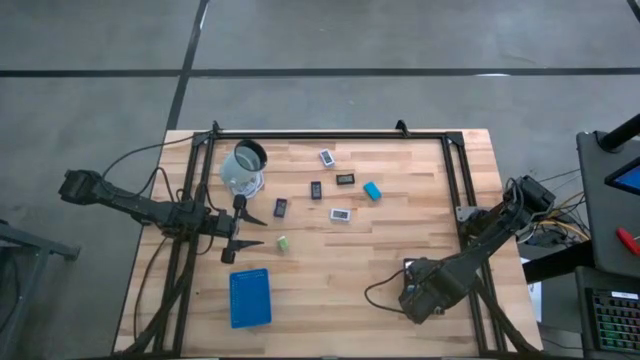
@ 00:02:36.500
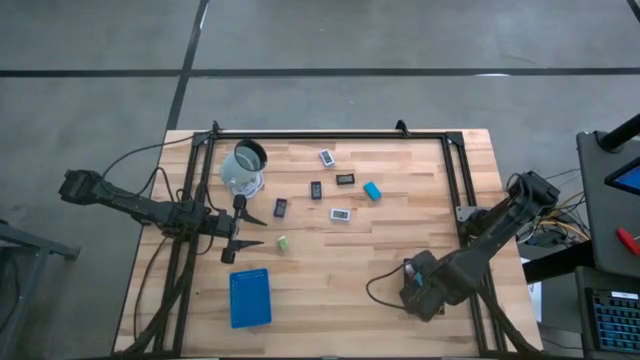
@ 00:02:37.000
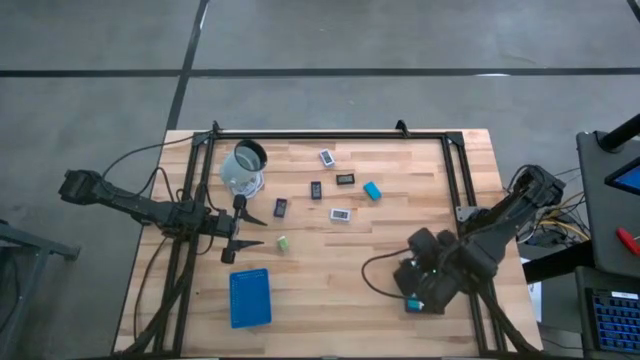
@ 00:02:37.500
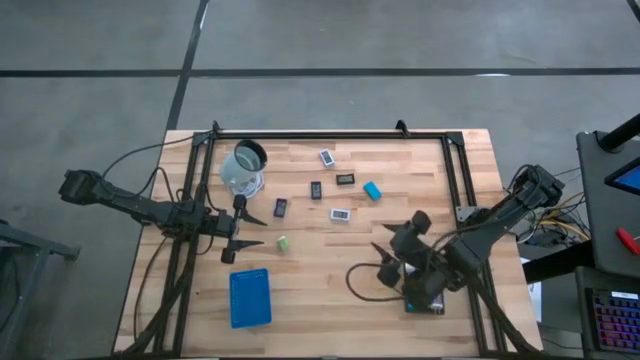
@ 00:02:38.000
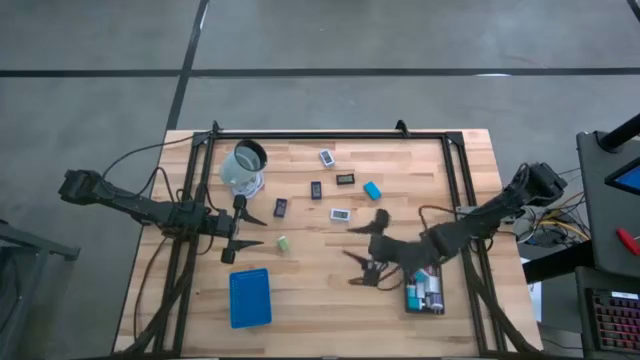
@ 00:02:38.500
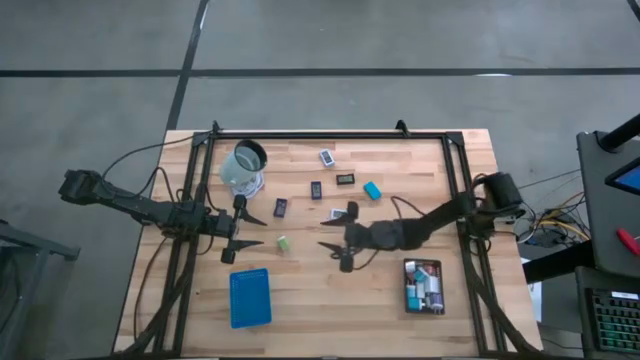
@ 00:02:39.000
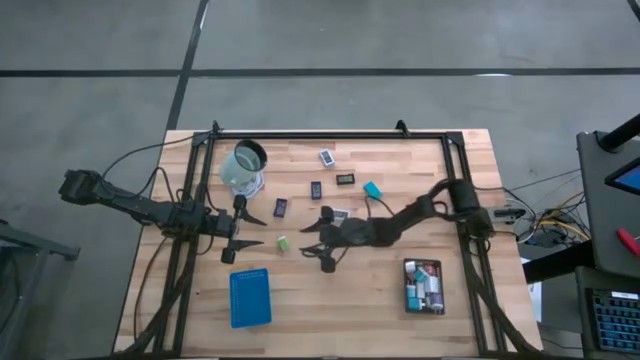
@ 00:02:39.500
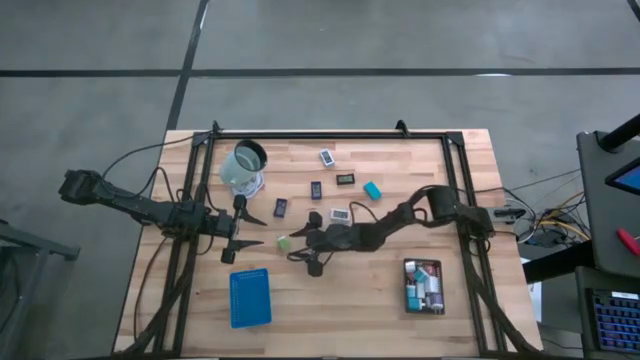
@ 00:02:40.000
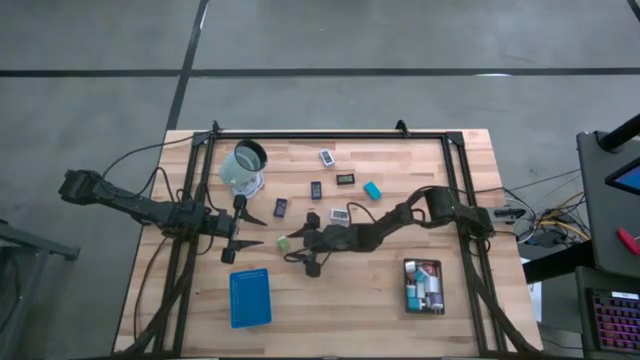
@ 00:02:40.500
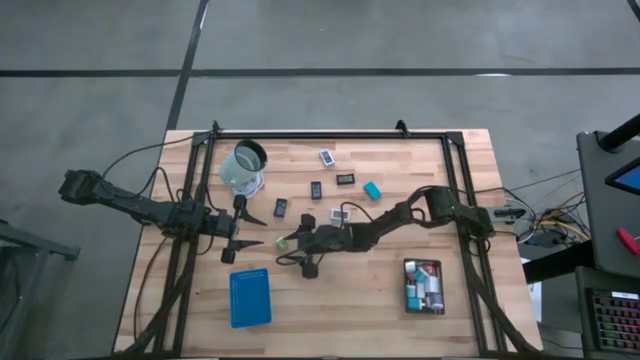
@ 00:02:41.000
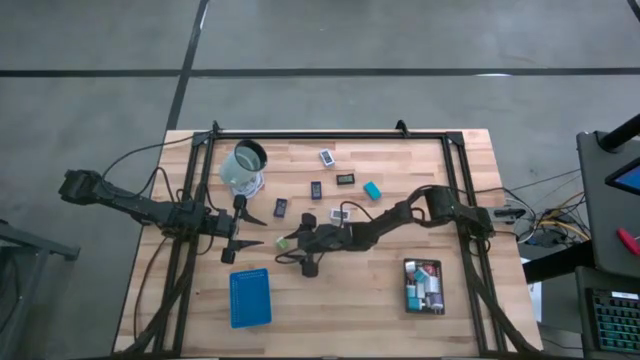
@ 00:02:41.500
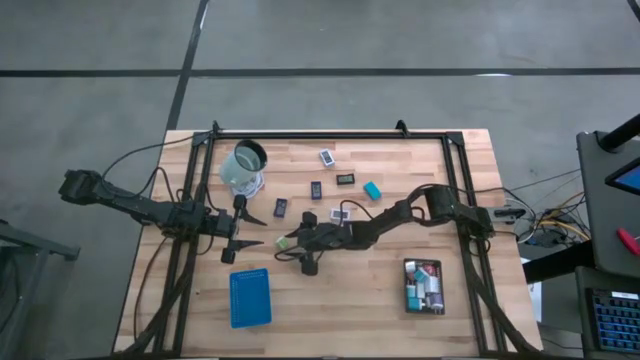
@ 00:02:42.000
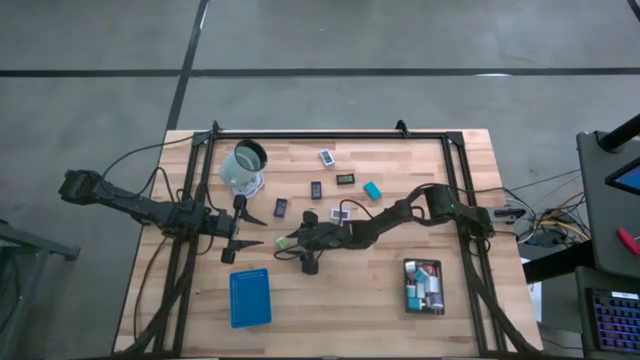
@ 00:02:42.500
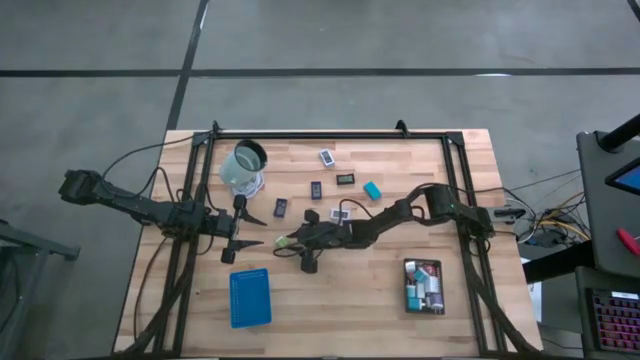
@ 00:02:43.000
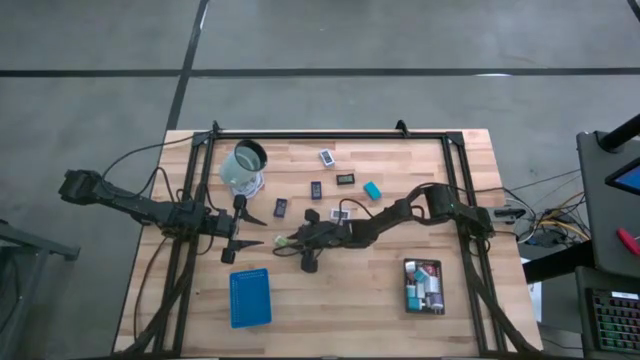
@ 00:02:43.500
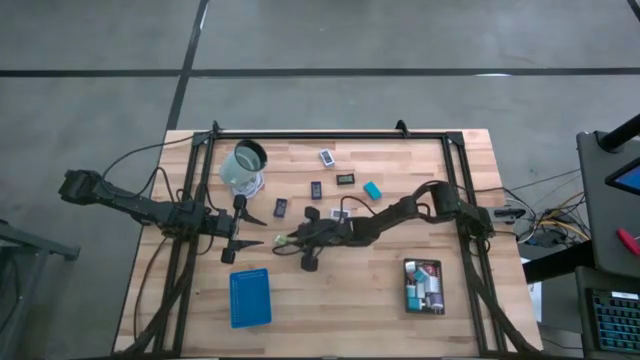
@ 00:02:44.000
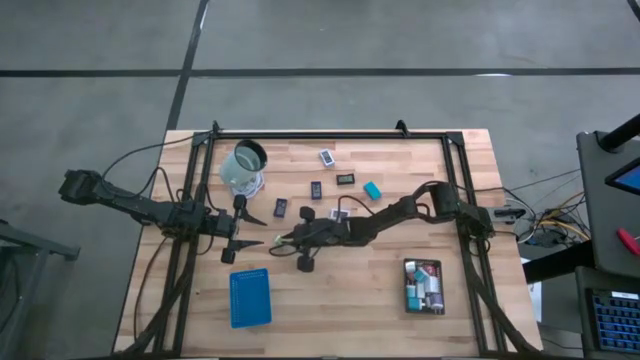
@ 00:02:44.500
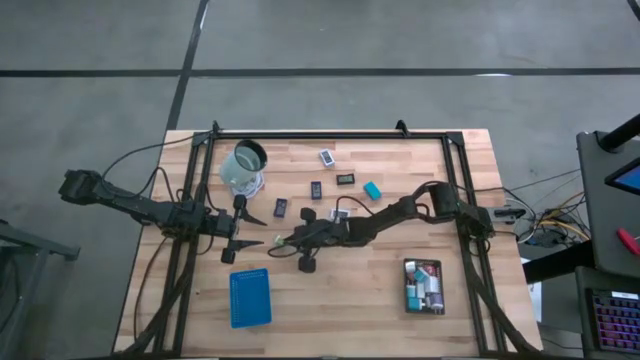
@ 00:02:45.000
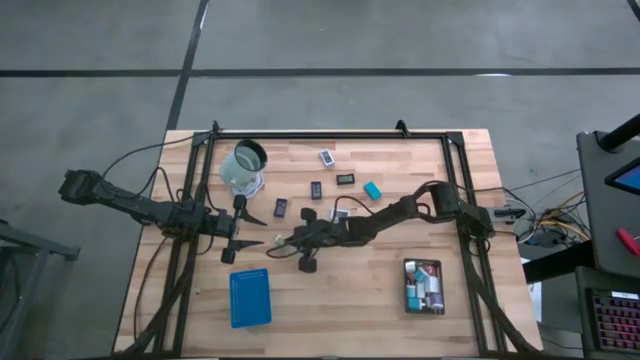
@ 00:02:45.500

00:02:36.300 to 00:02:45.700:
Task: Pick & Place Office items
Put the green charger adapter into the black bin

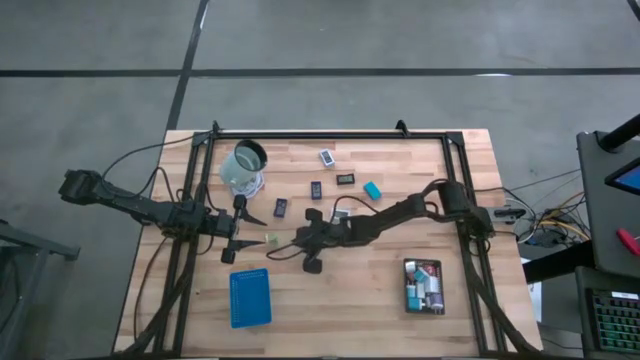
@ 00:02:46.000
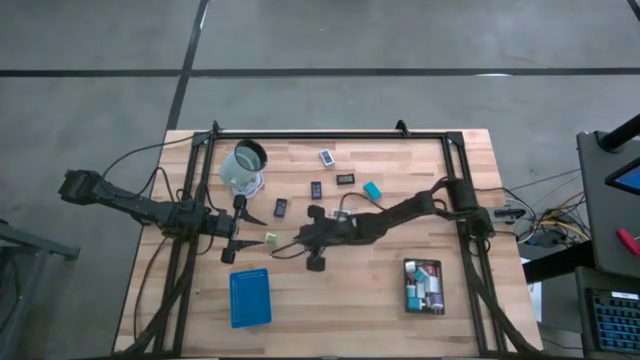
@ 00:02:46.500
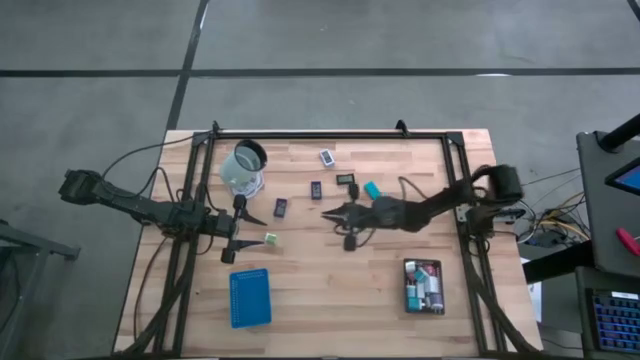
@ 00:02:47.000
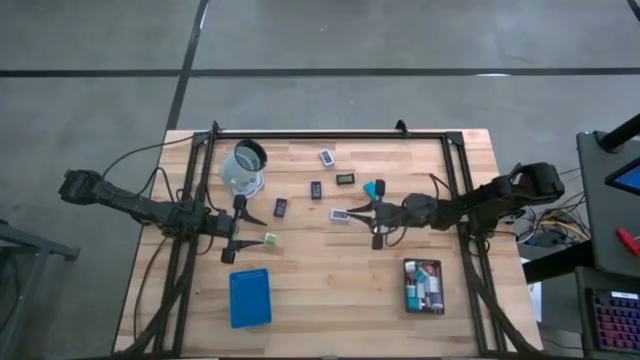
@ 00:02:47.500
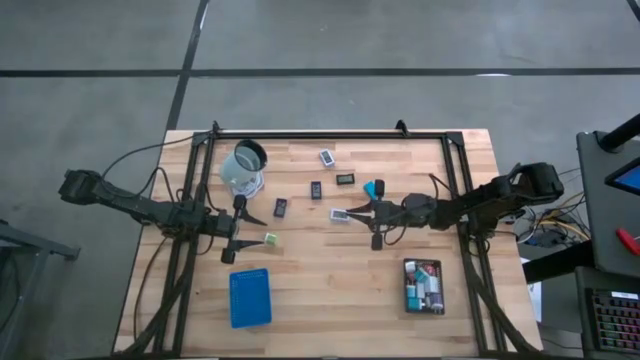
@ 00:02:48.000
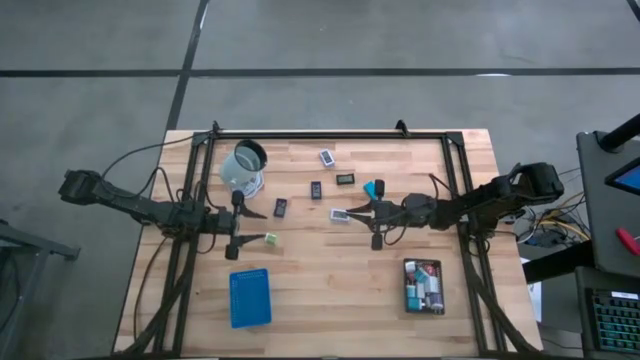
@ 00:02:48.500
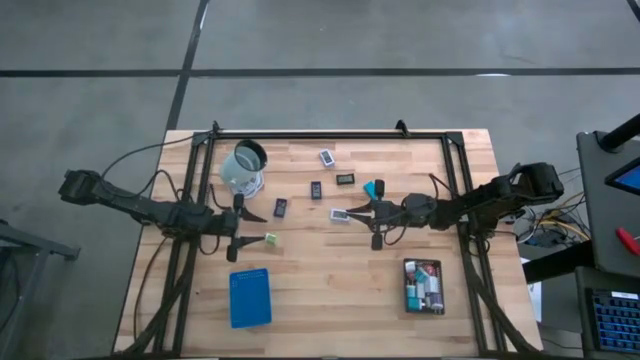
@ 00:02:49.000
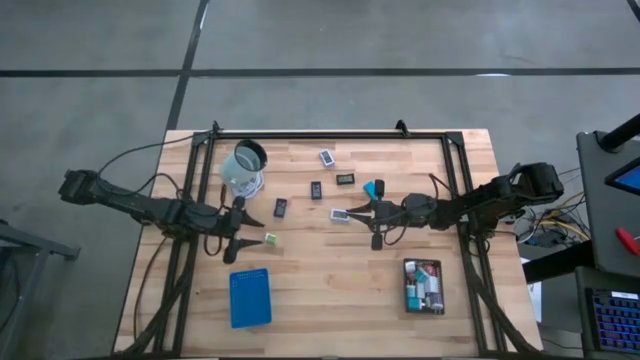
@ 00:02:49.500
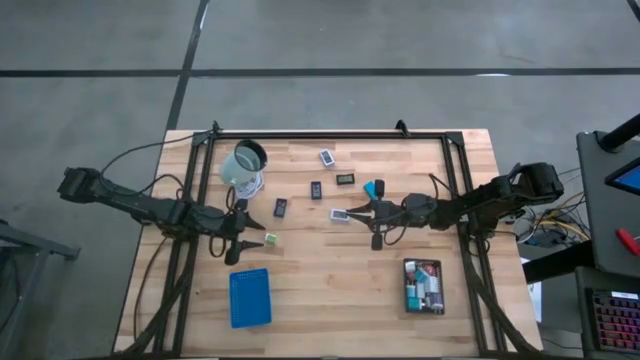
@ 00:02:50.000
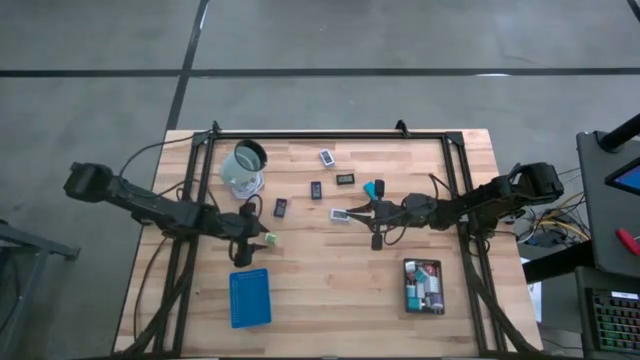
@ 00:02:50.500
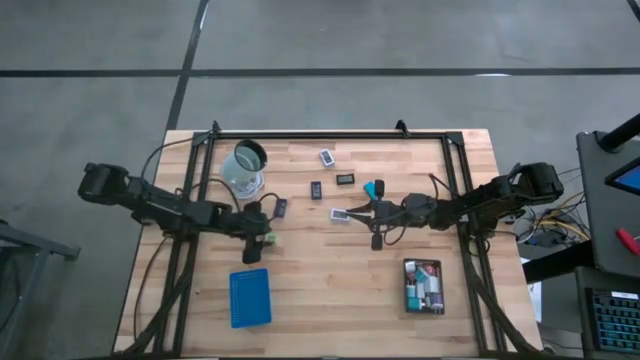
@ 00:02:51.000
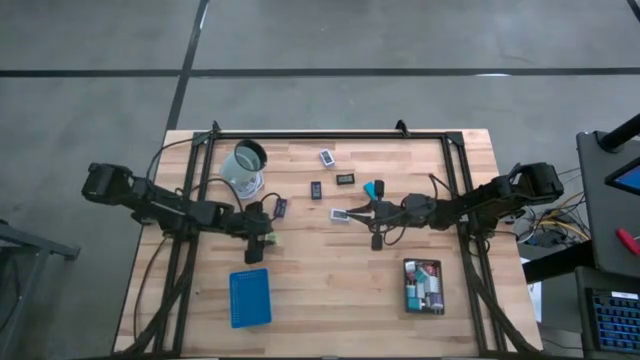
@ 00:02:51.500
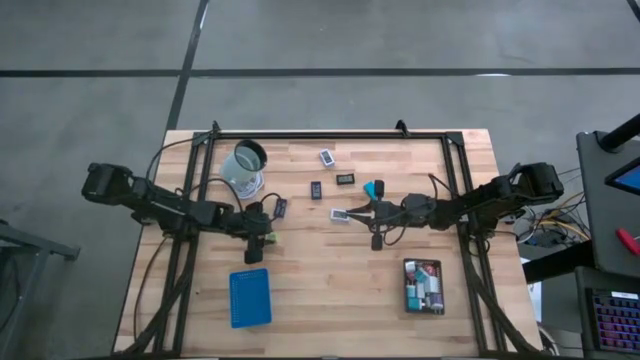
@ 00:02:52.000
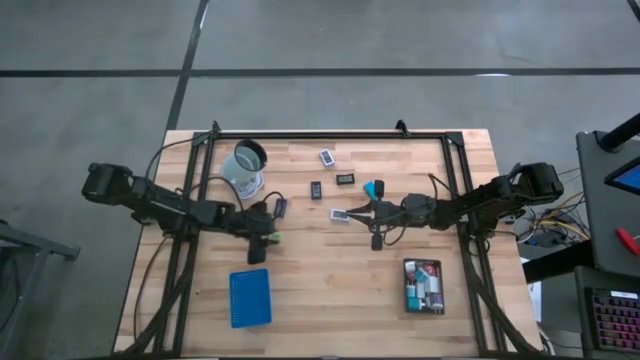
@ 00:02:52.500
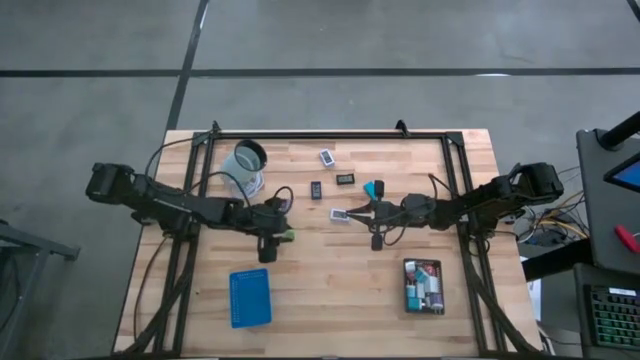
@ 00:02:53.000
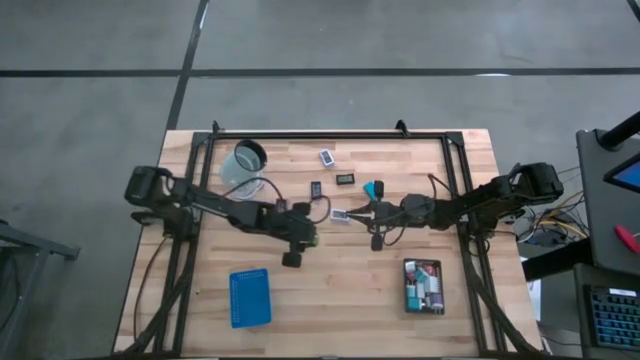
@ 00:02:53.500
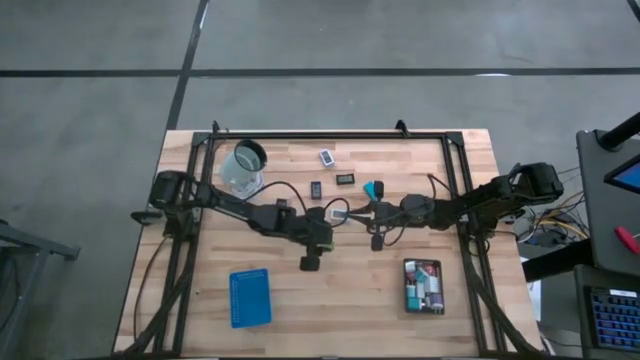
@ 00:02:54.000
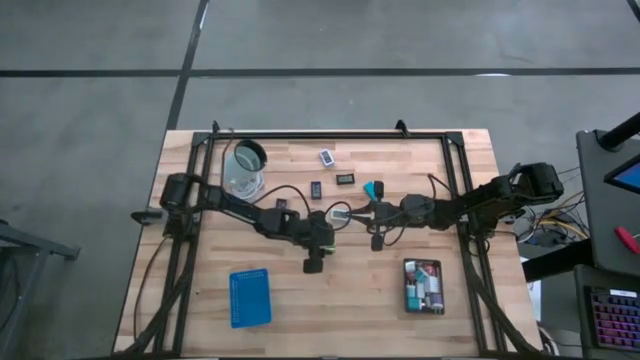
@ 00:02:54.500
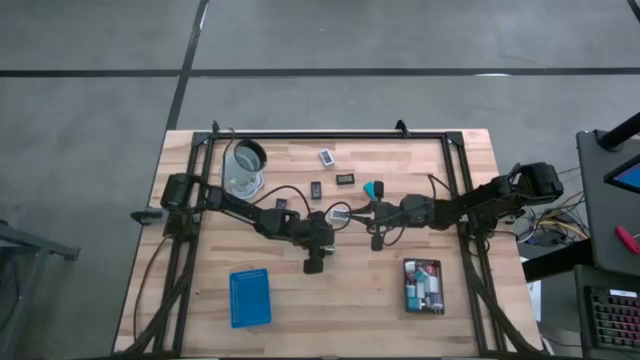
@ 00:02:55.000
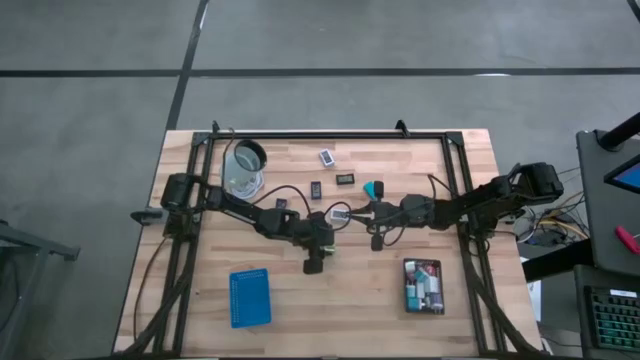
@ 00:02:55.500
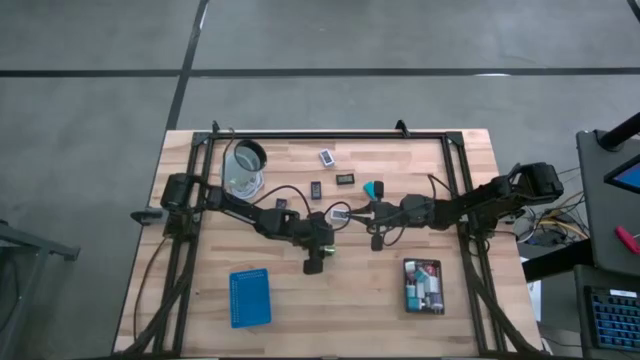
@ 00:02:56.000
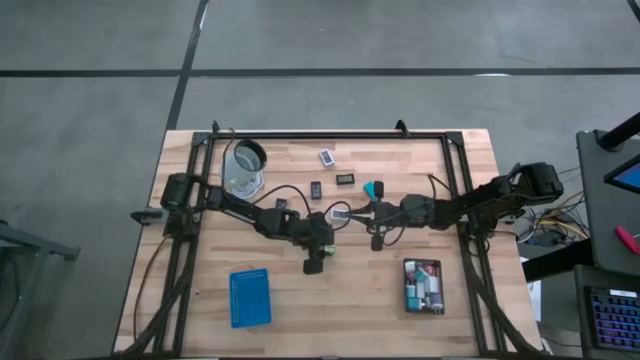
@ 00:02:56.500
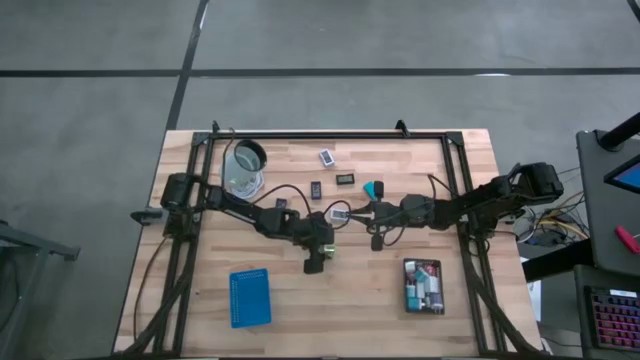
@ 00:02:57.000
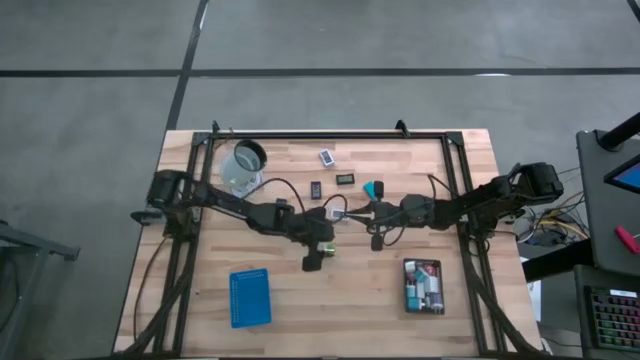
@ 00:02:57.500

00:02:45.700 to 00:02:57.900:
Put the green charger adapter into the black bin

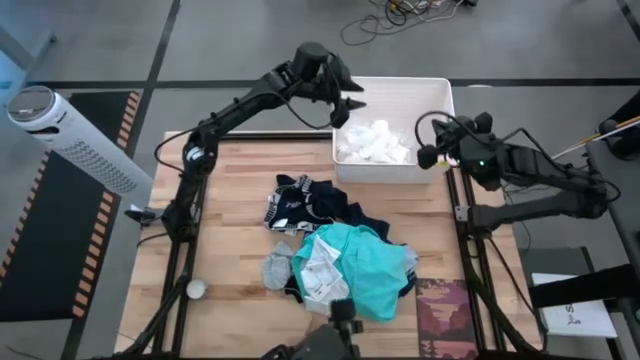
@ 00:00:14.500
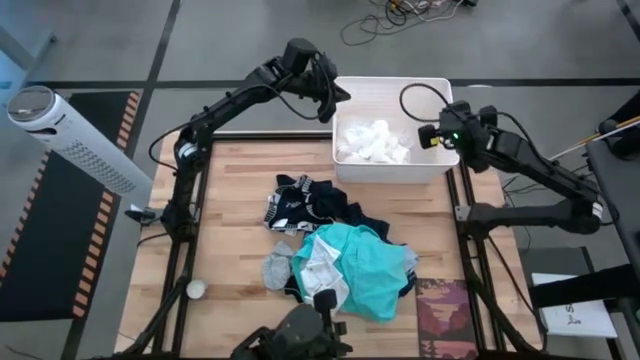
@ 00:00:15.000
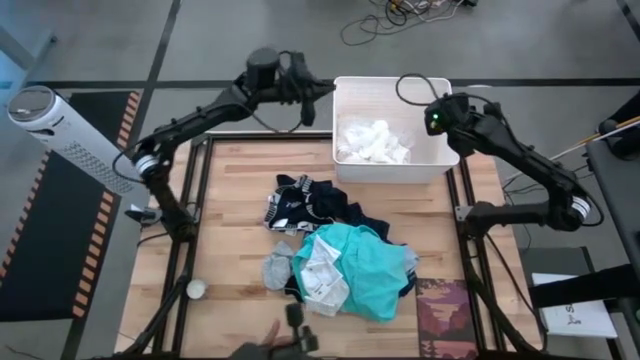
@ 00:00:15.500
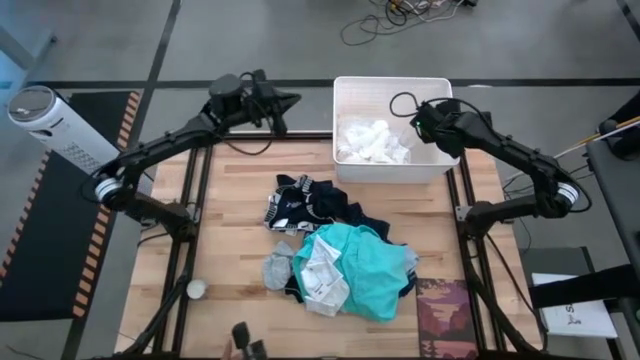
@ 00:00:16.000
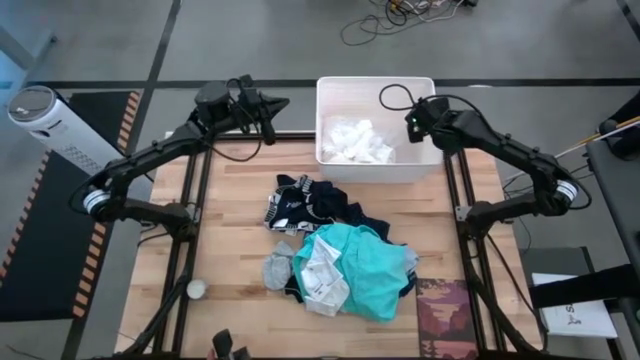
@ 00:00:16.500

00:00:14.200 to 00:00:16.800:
Task: Sort clothes
Adjust the white laundry bin
